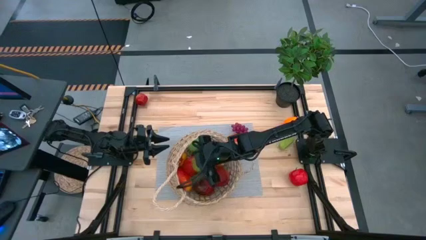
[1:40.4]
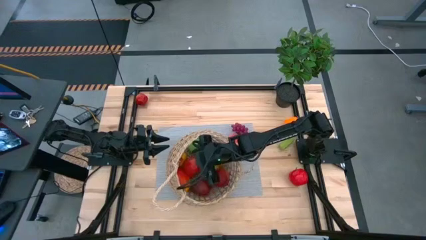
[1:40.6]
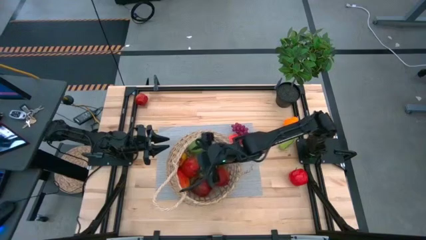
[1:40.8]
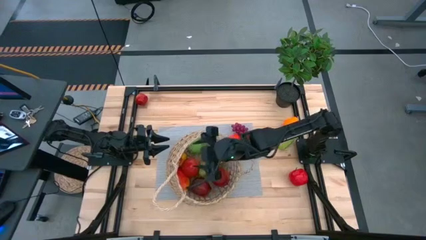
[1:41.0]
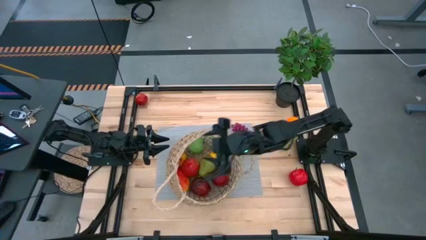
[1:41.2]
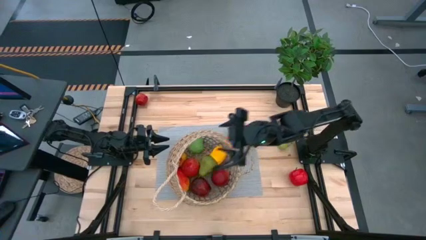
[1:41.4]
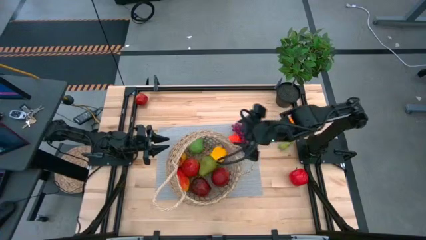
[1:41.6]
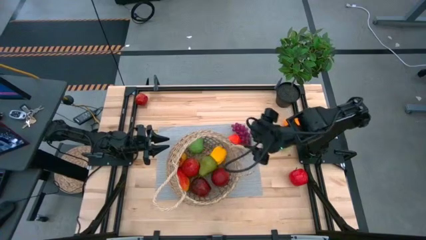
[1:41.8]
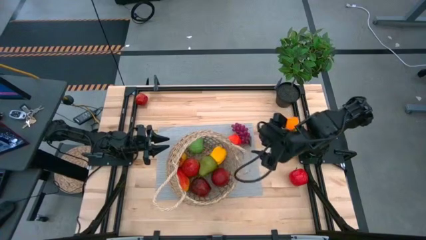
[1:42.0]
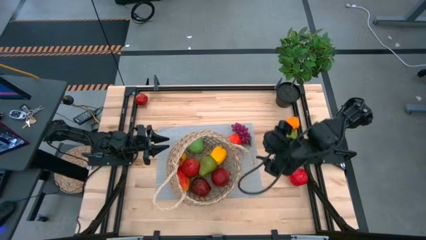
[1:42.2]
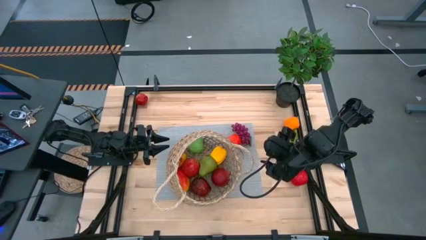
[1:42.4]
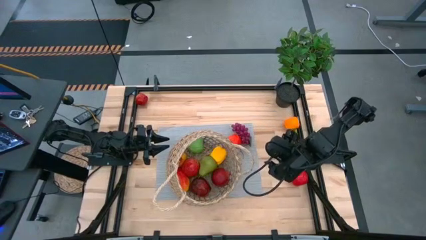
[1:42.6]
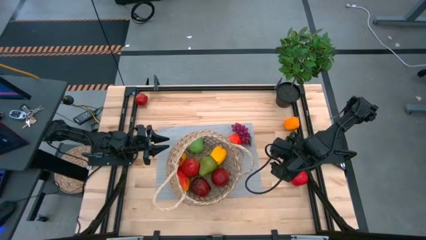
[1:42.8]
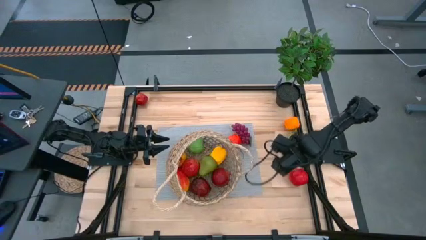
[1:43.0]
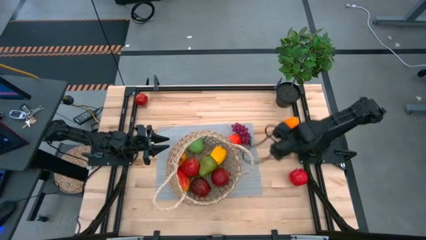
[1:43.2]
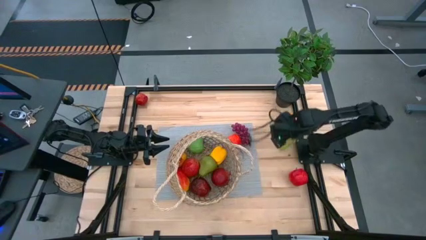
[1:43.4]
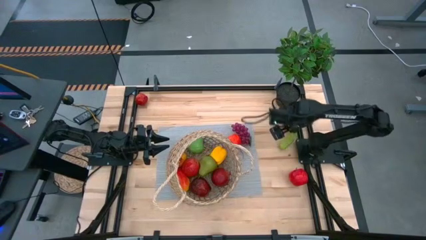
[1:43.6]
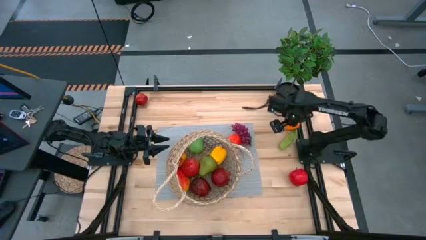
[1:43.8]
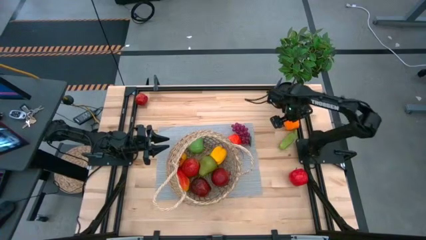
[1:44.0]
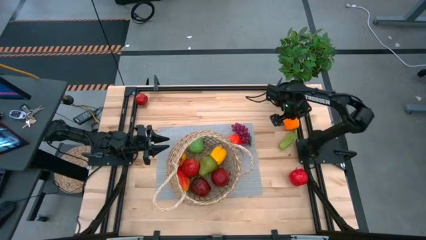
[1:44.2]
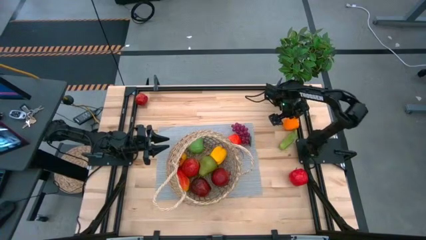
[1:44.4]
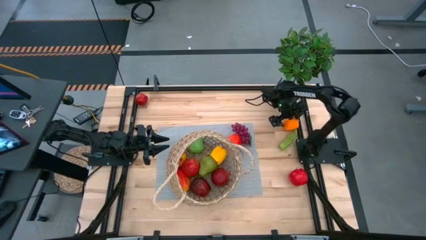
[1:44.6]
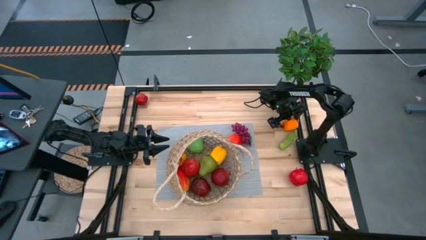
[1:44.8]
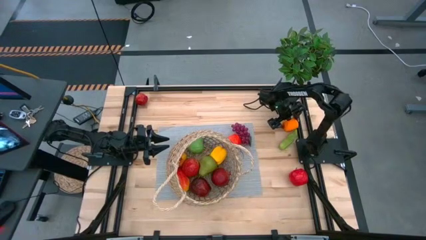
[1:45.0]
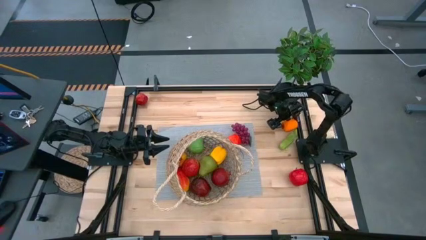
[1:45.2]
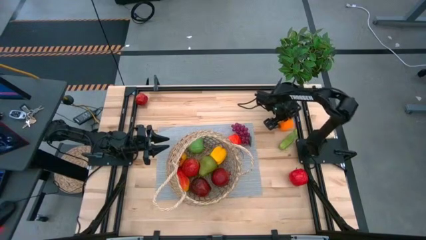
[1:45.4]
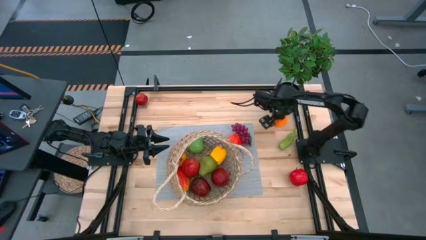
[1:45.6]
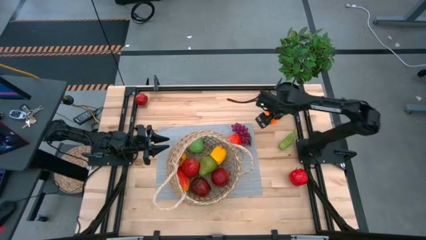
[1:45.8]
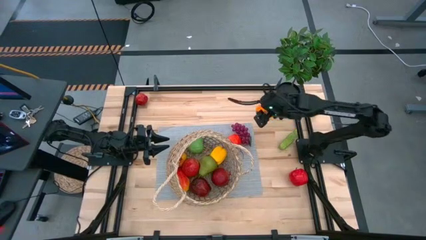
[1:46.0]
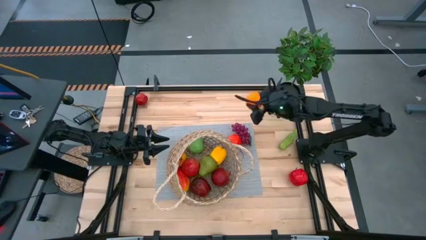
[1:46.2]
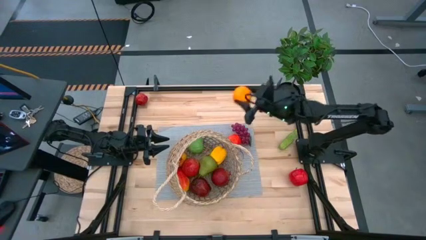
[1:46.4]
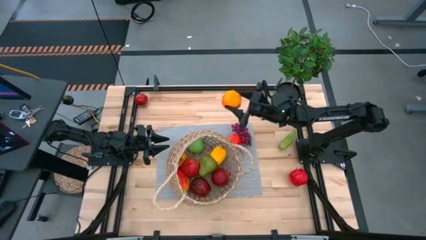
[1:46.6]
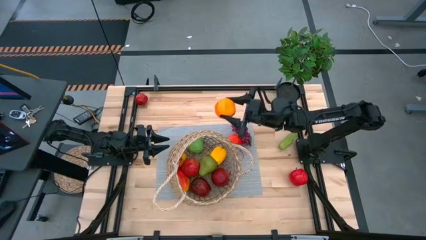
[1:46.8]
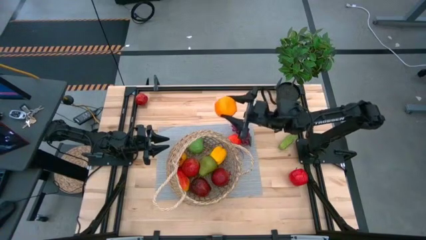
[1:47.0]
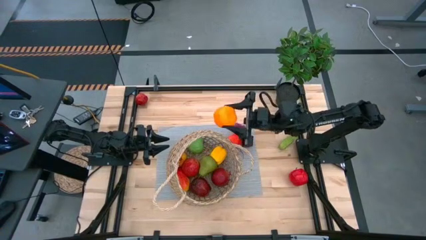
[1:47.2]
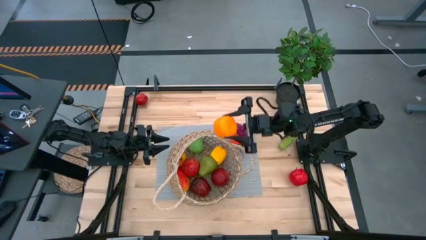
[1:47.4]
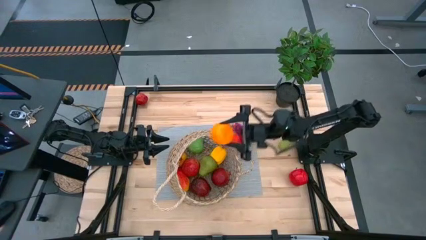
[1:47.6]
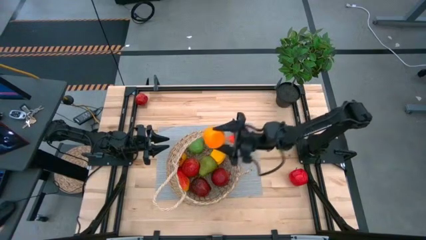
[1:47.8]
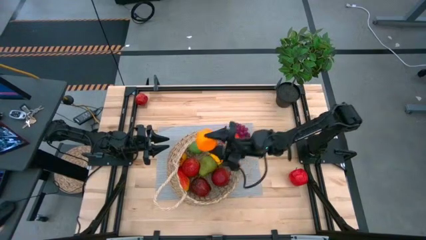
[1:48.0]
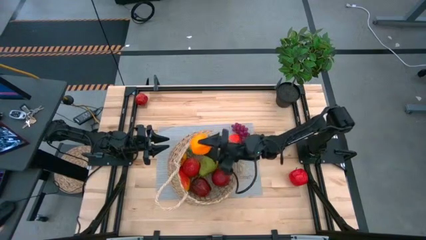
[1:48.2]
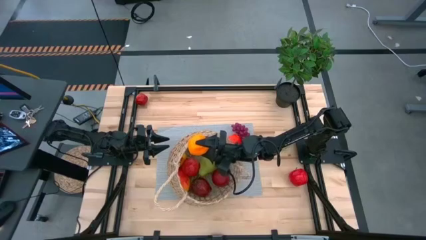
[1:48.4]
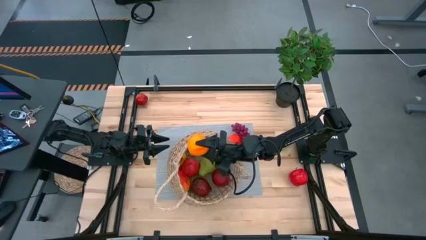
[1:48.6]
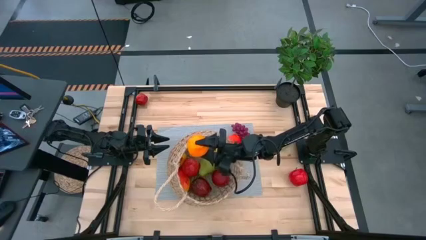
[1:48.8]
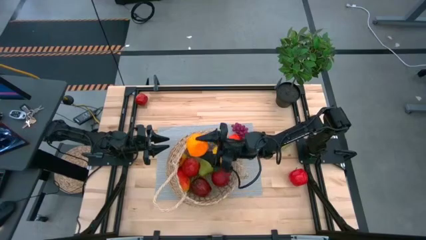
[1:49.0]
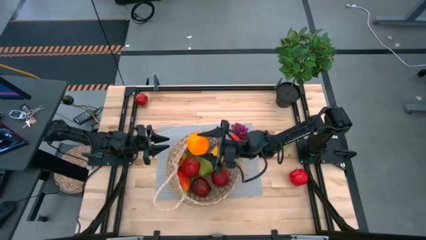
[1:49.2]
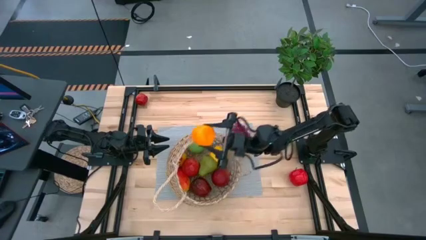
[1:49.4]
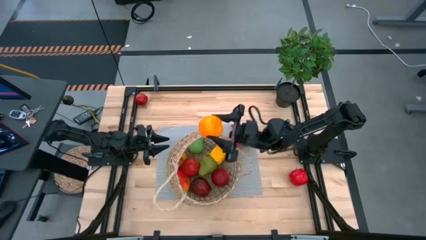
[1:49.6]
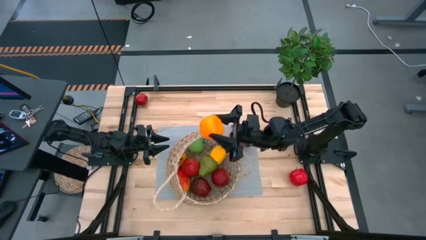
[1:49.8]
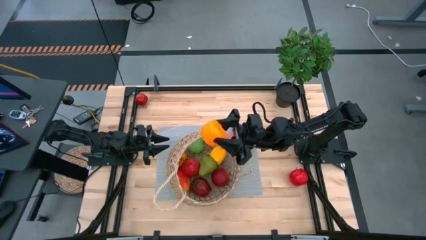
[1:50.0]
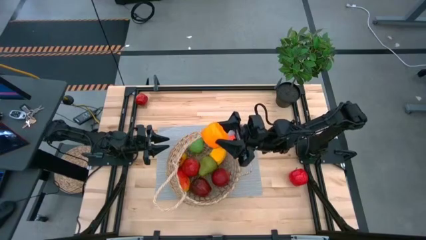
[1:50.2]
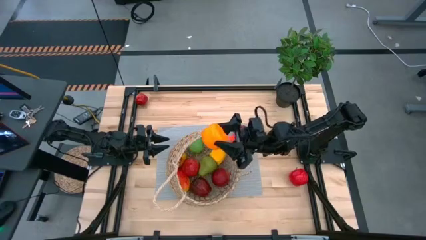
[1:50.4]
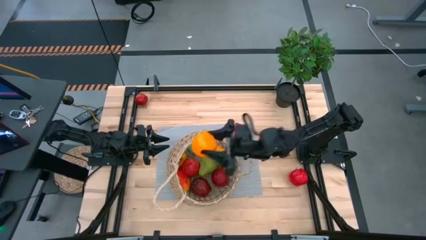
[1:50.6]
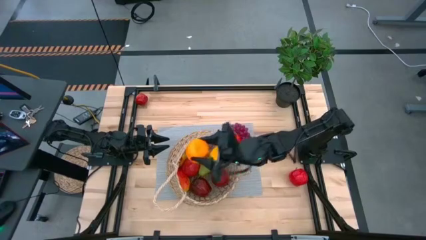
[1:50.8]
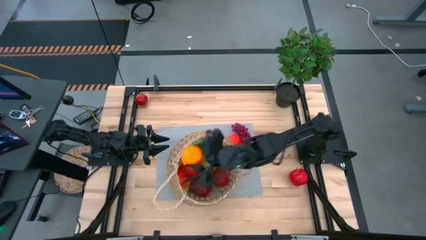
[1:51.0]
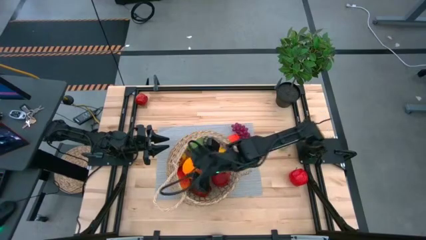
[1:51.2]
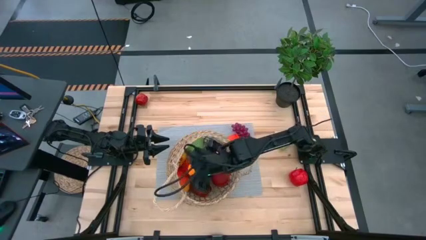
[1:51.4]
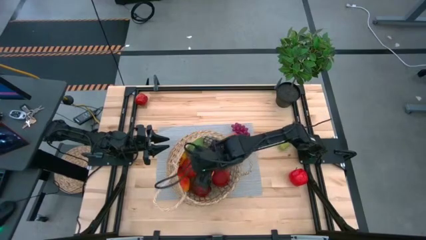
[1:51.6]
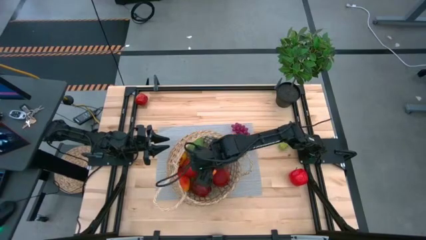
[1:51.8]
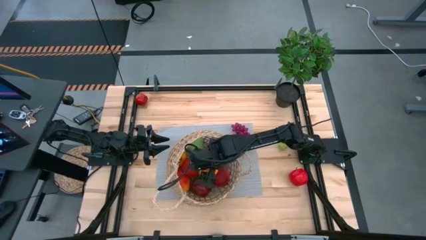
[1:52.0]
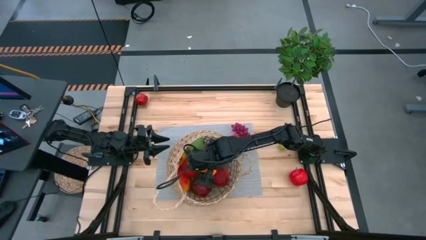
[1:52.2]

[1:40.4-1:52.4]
Task: Build produce basket
Put the orange into the brown basket

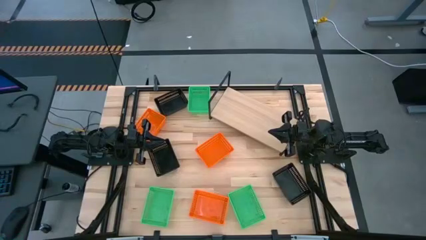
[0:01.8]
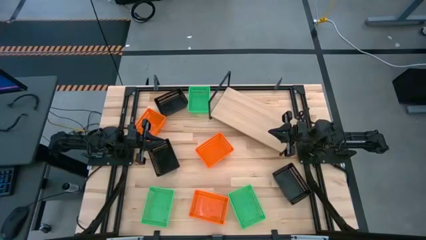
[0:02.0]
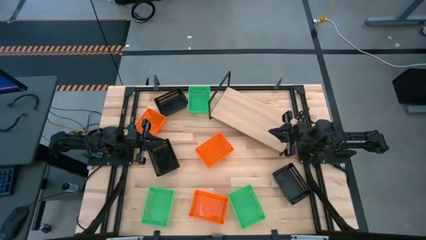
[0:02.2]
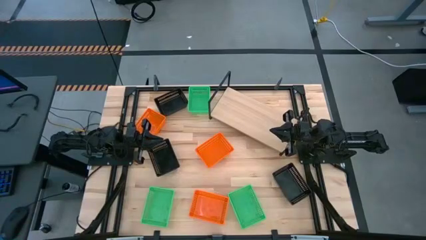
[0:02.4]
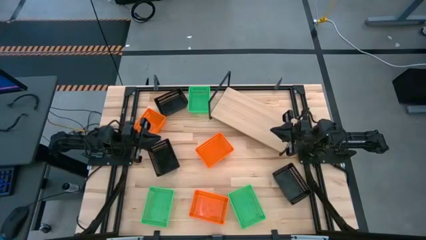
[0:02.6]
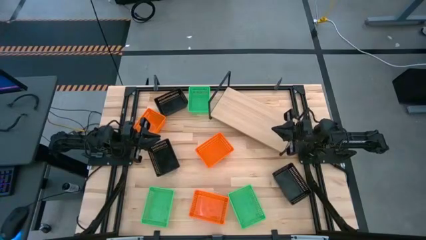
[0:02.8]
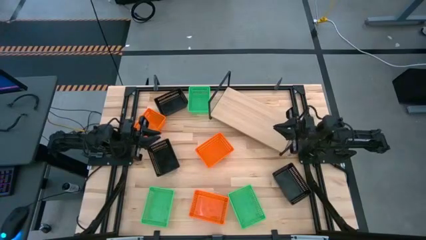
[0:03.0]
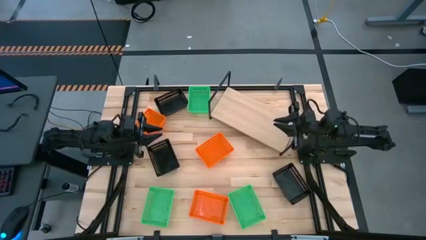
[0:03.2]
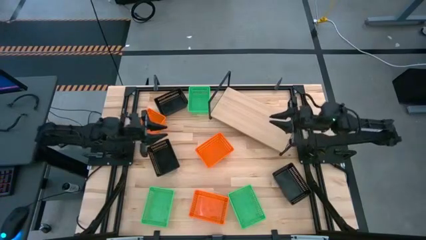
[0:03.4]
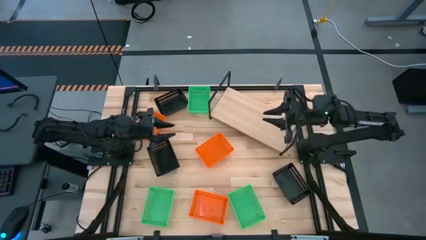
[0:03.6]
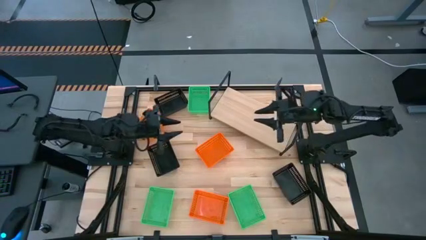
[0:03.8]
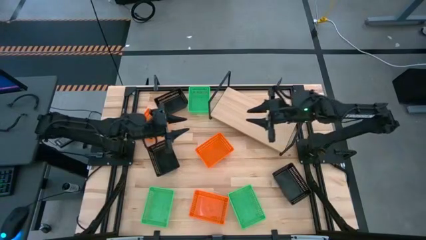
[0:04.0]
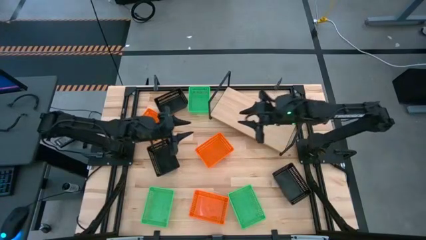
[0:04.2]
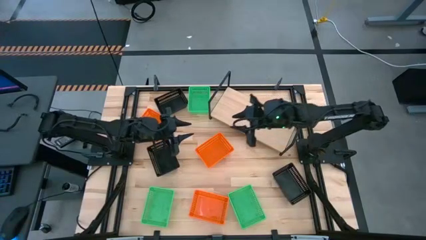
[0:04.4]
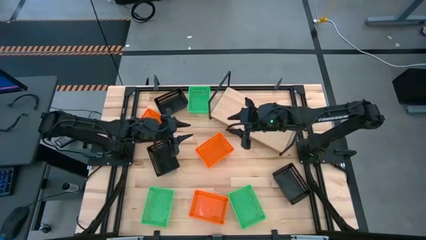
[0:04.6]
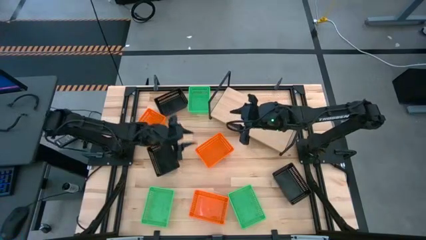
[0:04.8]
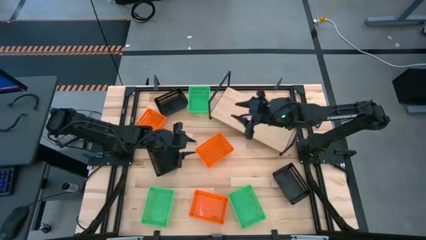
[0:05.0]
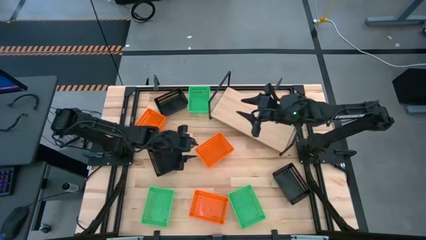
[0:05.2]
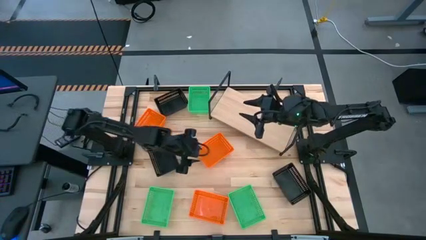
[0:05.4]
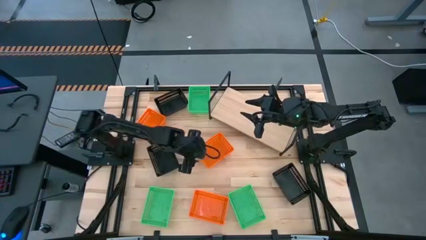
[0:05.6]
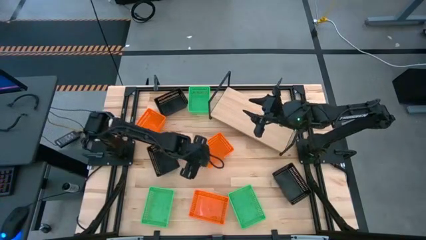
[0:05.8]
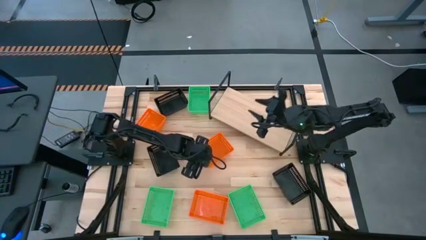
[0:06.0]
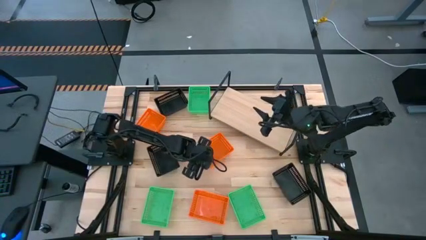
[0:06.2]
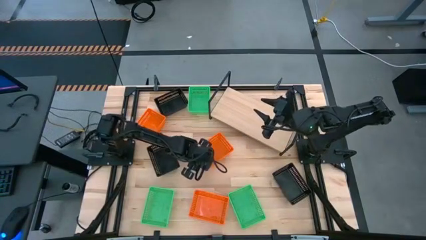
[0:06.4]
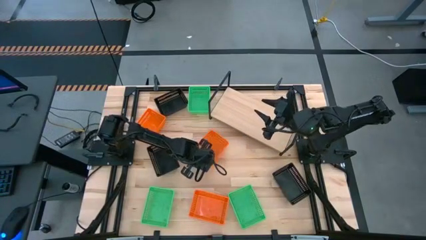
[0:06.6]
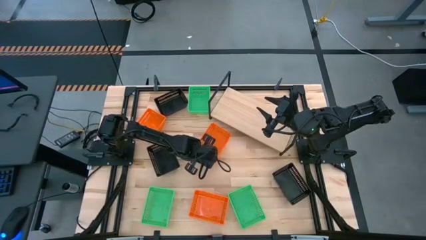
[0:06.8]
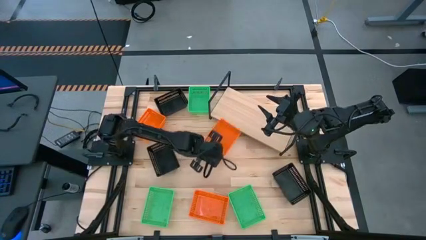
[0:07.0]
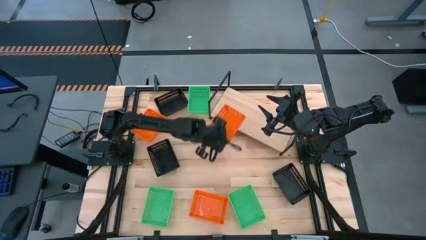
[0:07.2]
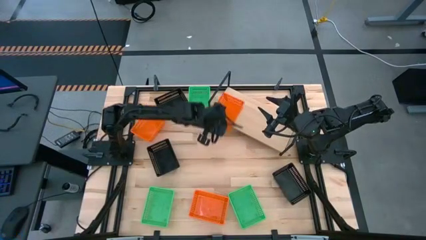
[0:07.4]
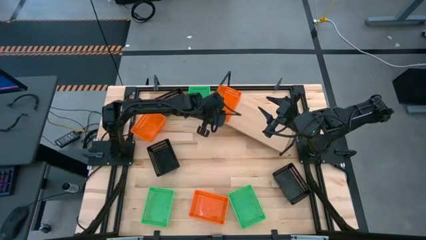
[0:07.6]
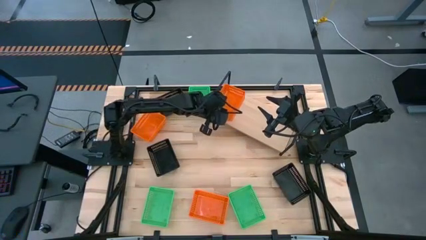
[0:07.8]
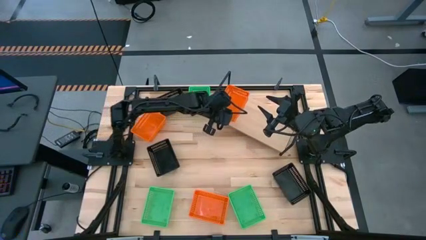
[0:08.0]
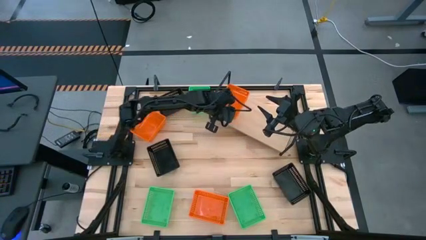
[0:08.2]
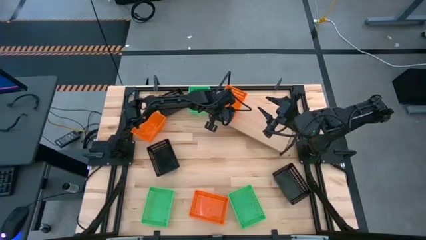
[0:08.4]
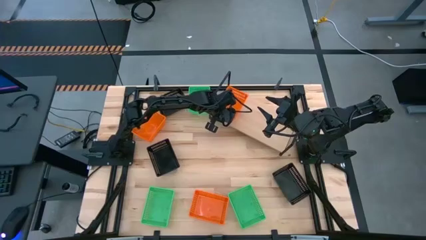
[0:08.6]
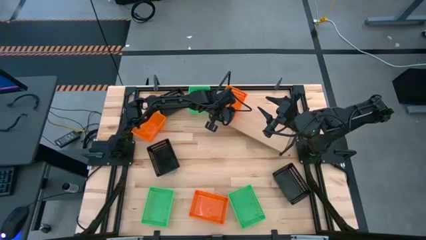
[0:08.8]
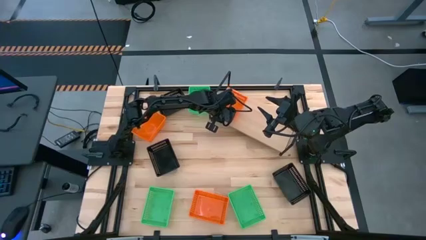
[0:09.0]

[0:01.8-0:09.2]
Task: Stack baskets on shelf by color
Put the center orange basket on the shelf
